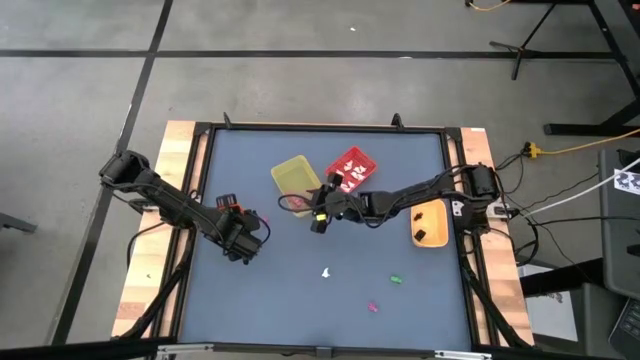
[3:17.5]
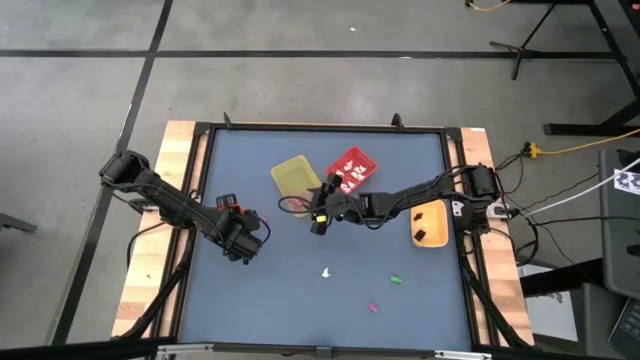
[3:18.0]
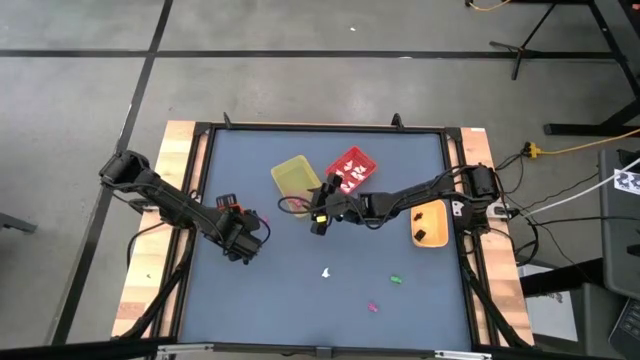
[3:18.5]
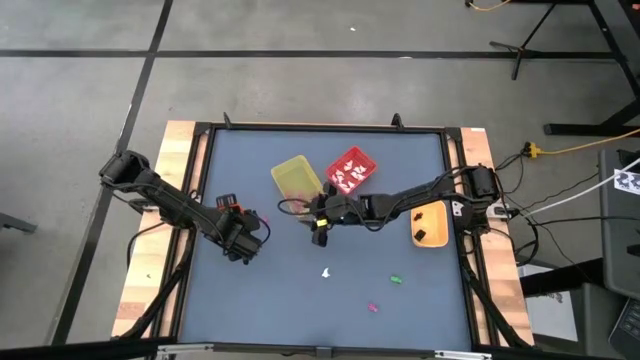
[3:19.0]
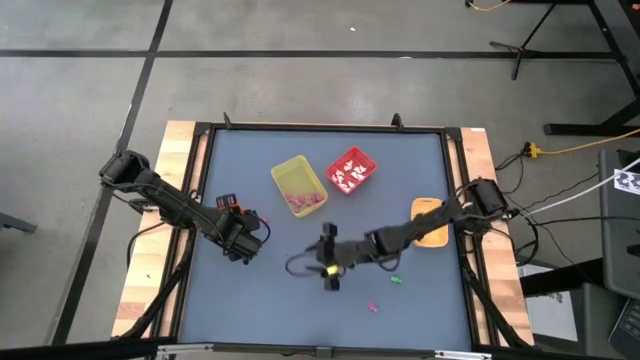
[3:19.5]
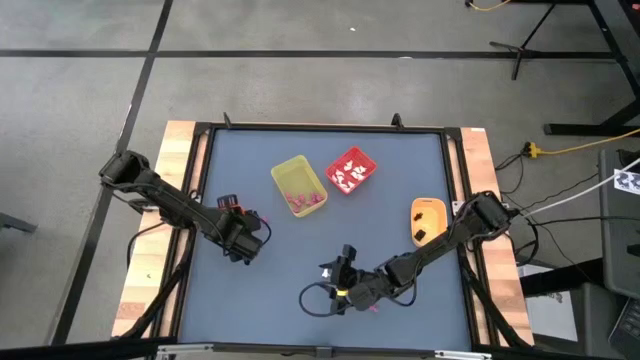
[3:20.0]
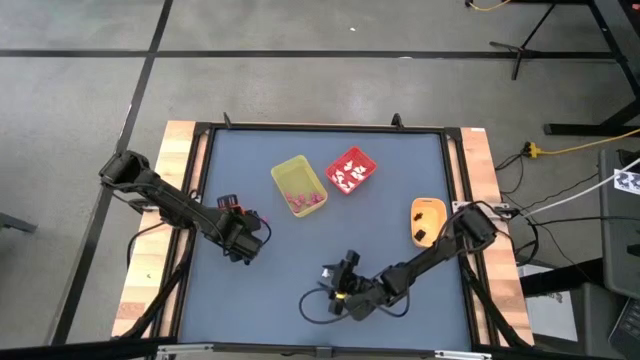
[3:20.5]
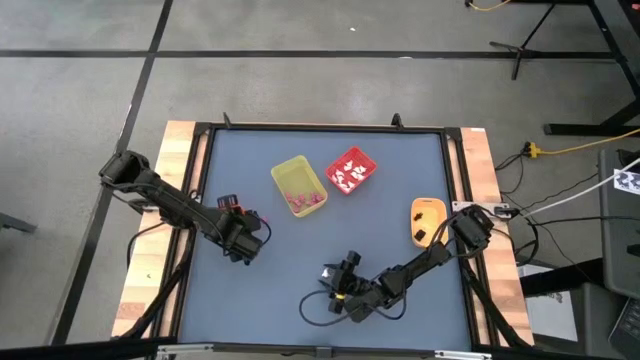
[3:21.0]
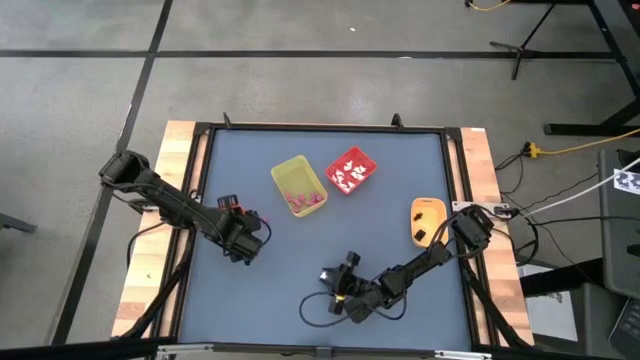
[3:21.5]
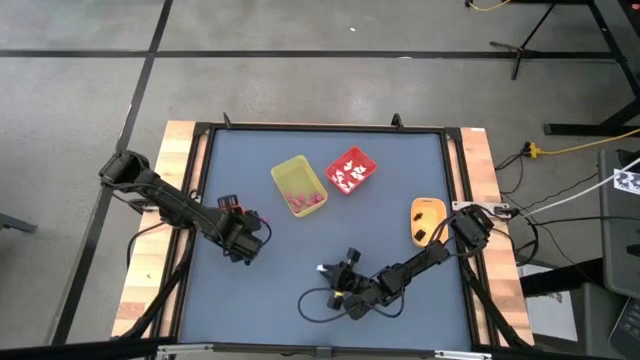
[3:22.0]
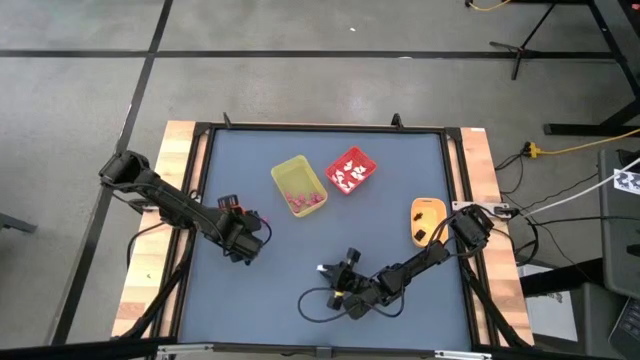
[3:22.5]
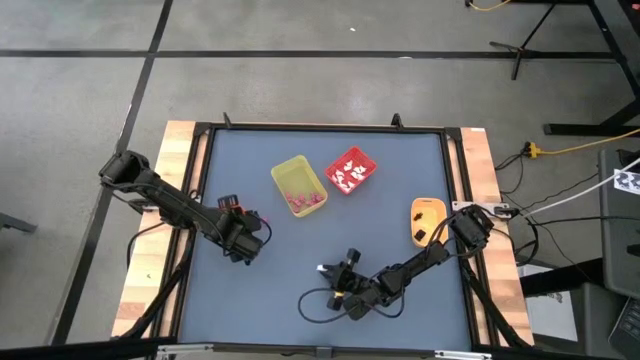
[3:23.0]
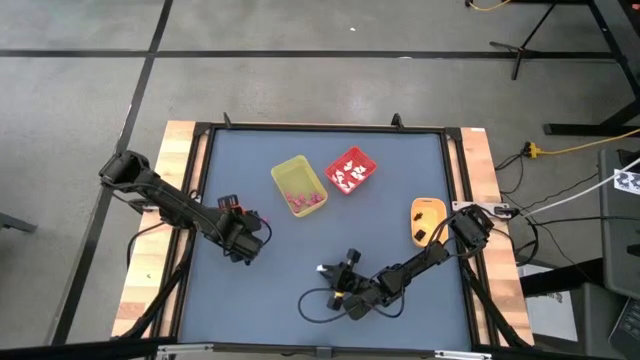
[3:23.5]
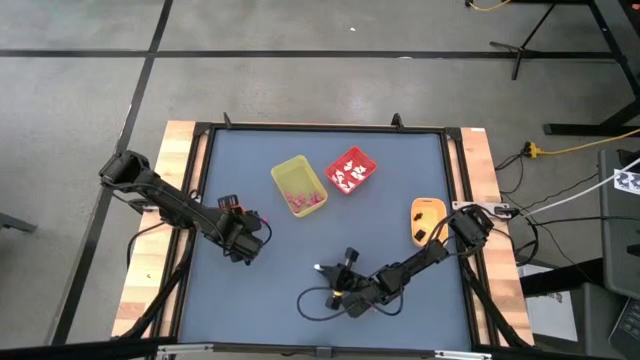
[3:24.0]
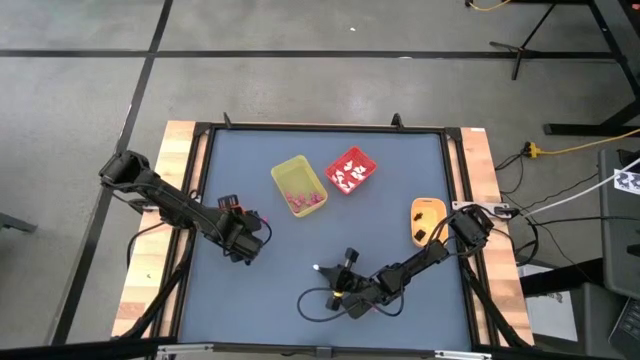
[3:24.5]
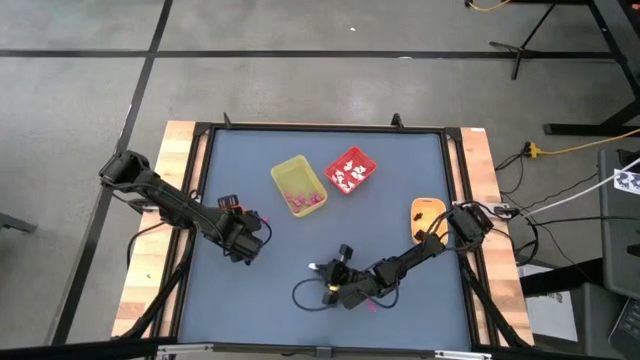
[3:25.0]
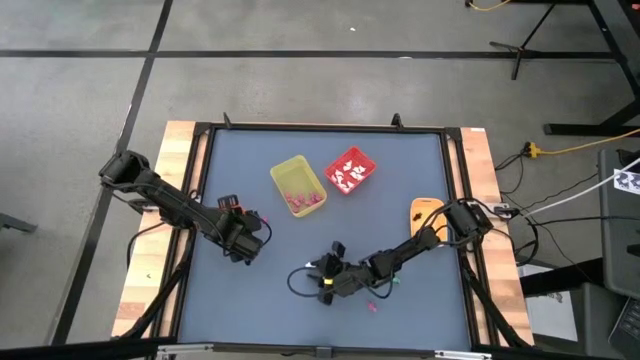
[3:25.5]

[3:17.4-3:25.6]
Task: Sort Halloween decoration
Put the white ghost toy into the red bin

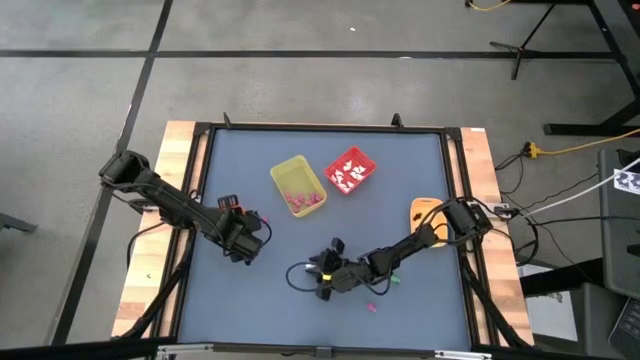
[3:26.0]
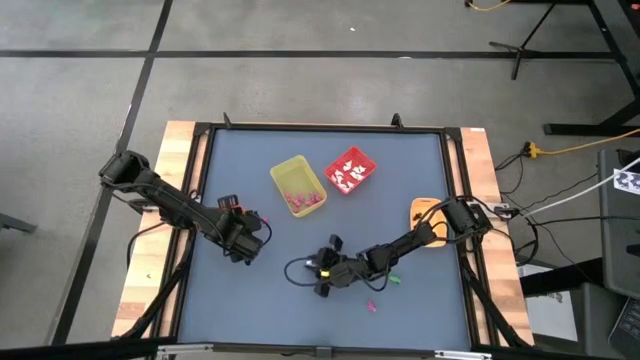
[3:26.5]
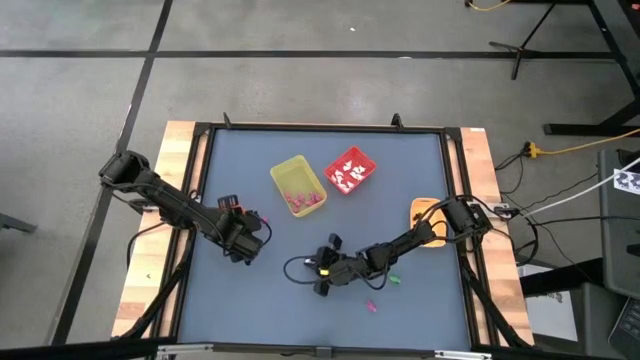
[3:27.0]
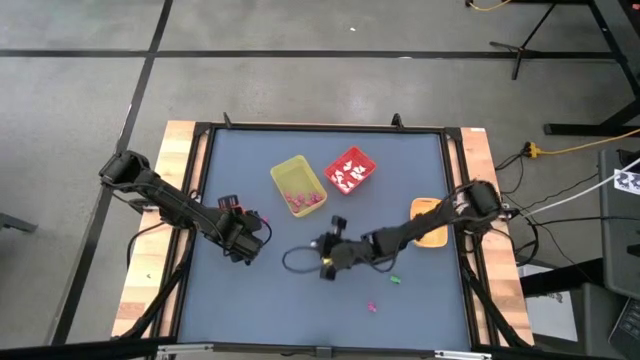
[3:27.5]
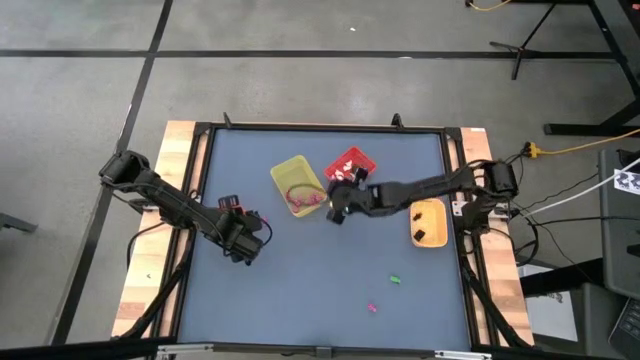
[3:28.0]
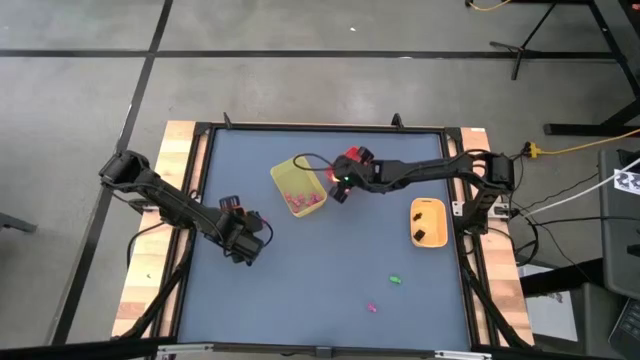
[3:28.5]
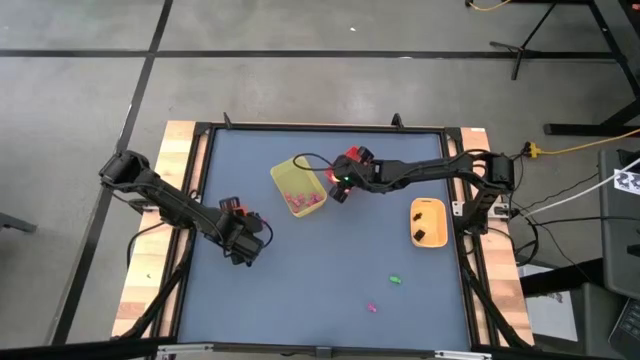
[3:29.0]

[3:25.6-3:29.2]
Put the white ghost toy into the red bin

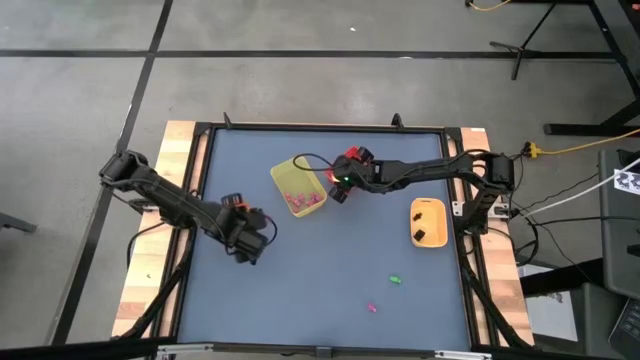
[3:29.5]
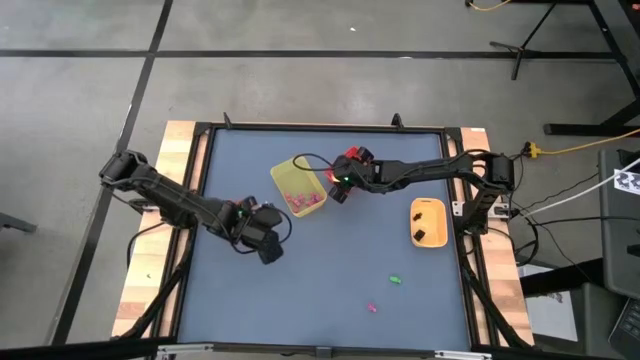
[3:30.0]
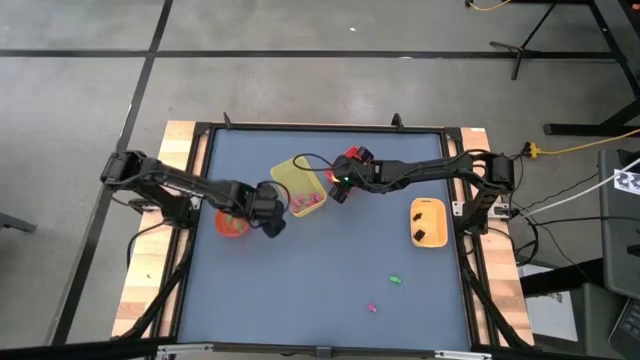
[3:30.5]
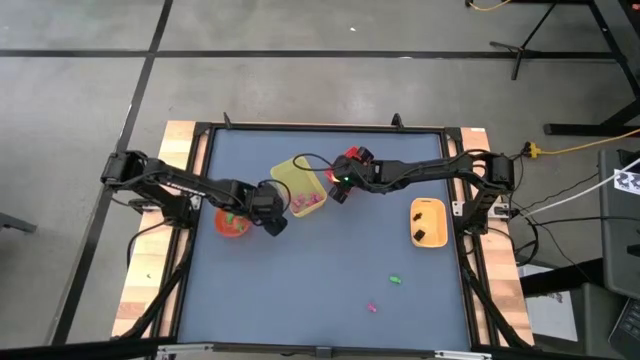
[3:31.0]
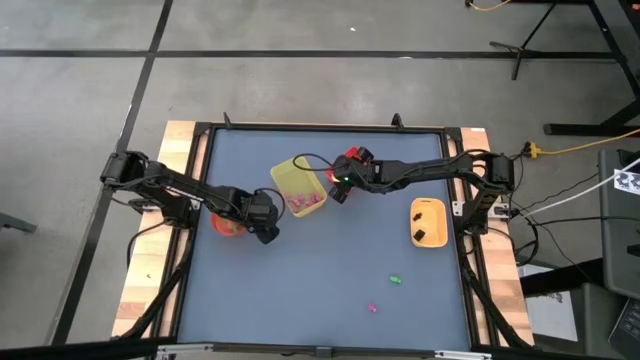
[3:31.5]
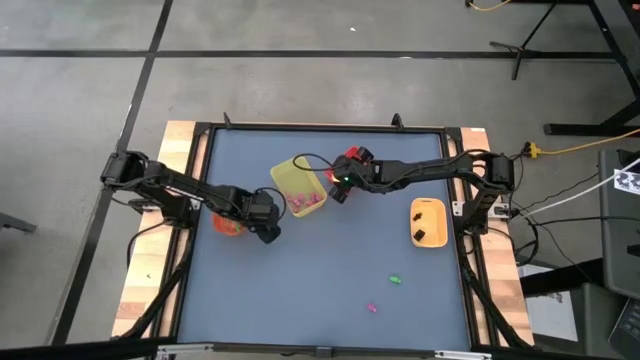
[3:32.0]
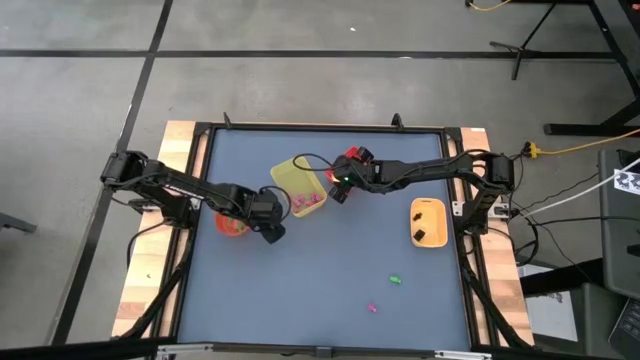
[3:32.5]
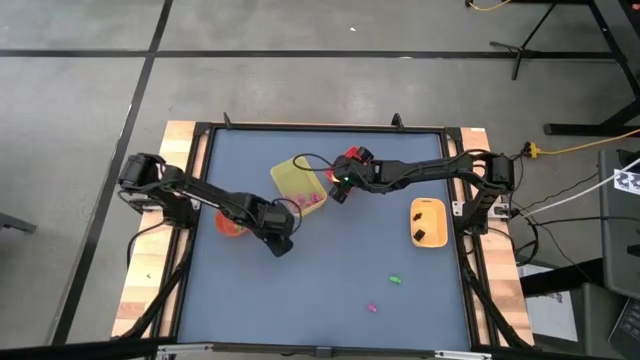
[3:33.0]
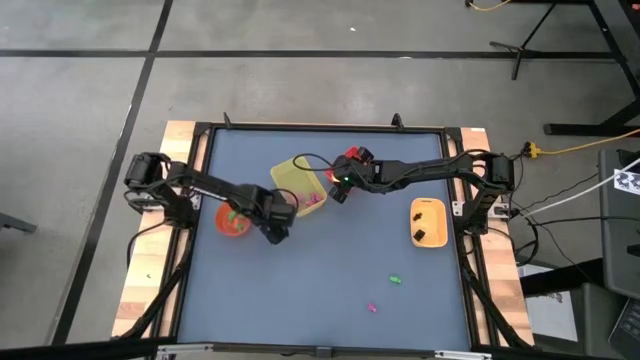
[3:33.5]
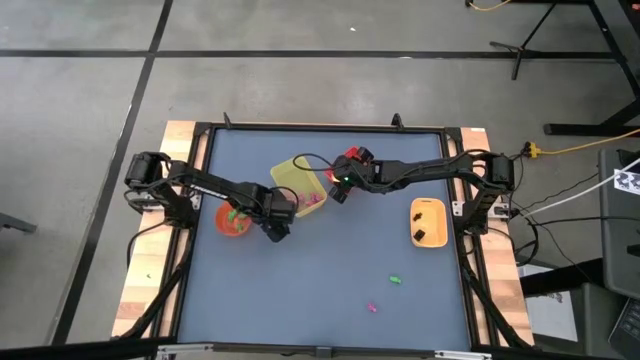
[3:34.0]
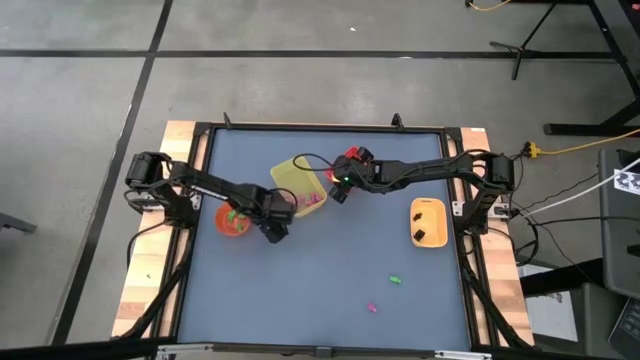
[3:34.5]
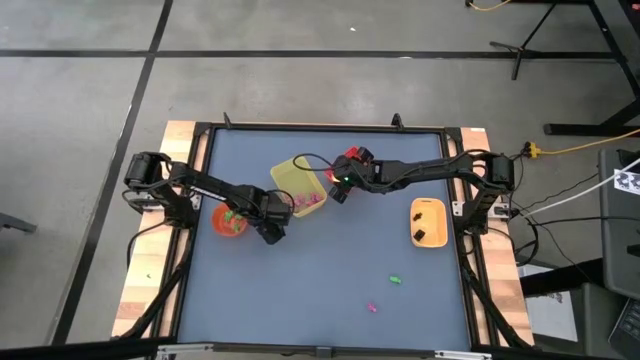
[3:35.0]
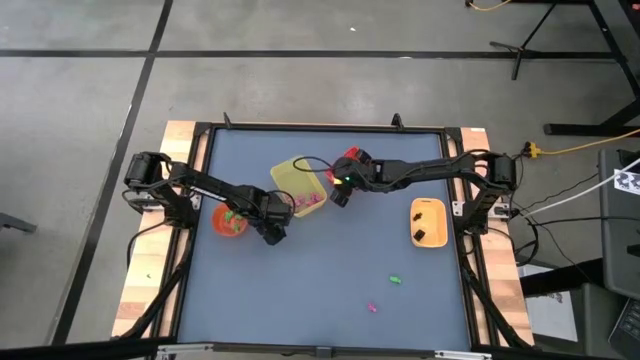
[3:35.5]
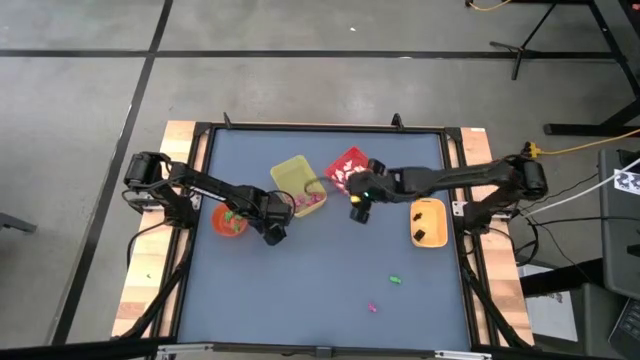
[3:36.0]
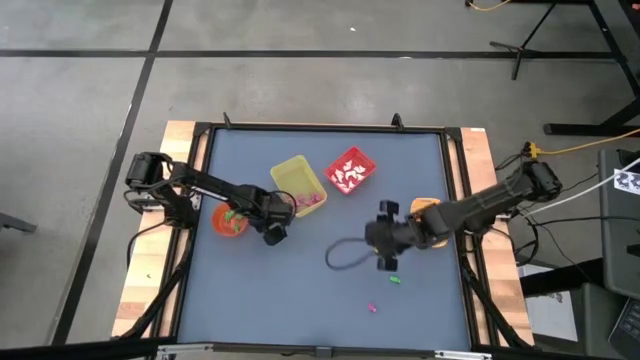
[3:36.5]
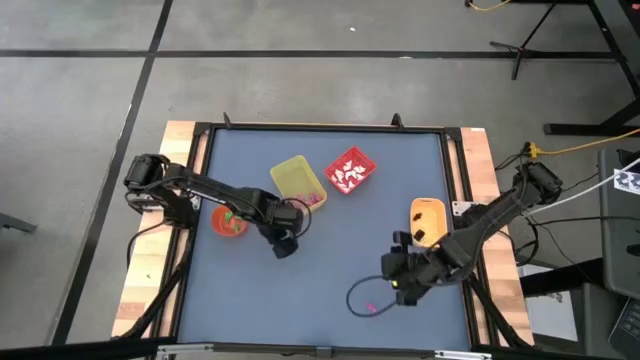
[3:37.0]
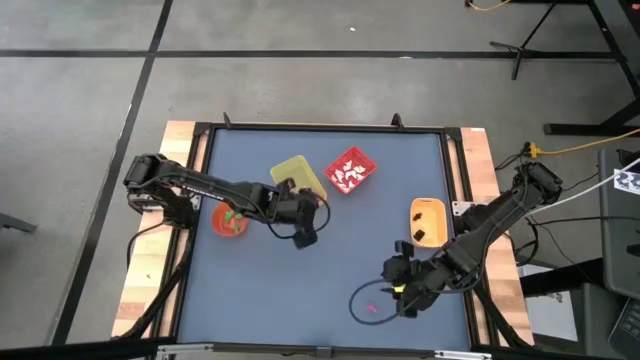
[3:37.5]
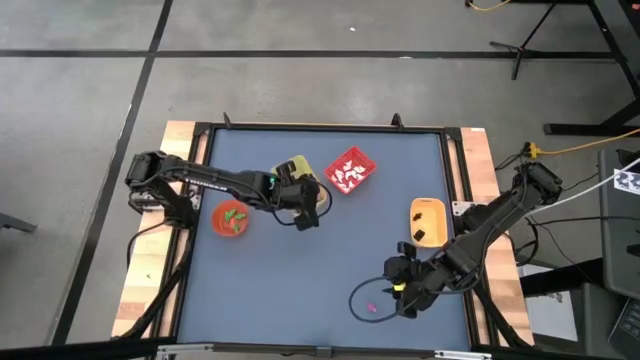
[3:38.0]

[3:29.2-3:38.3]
Put the pink skeleton toy into the yellow bin

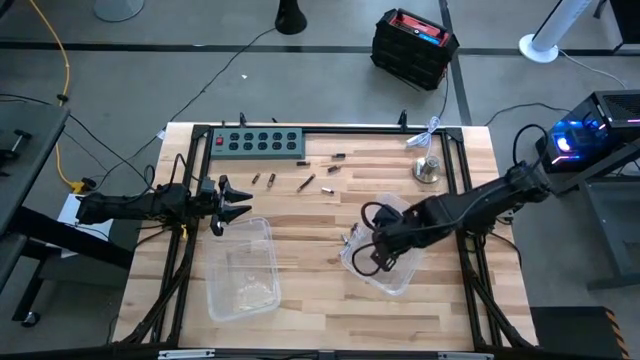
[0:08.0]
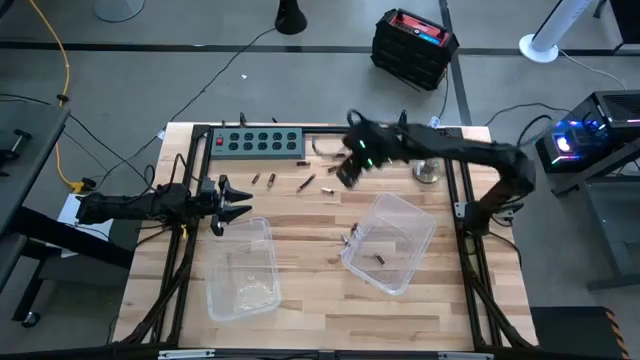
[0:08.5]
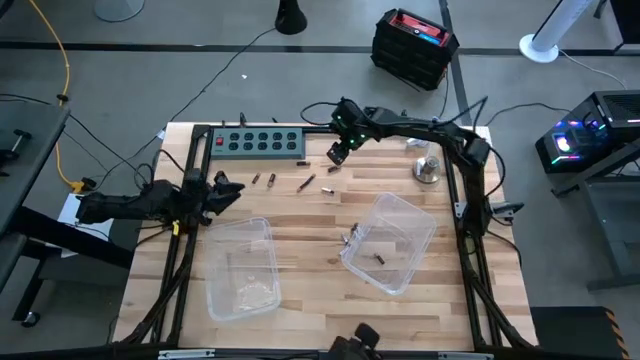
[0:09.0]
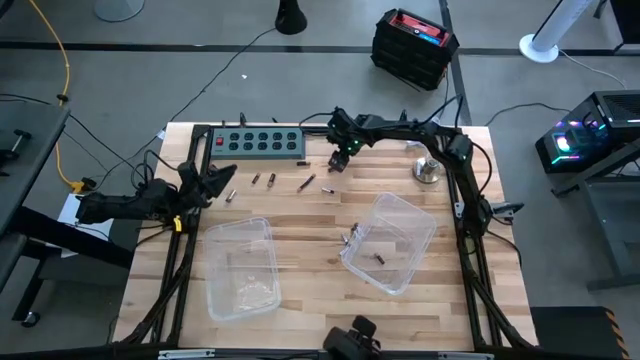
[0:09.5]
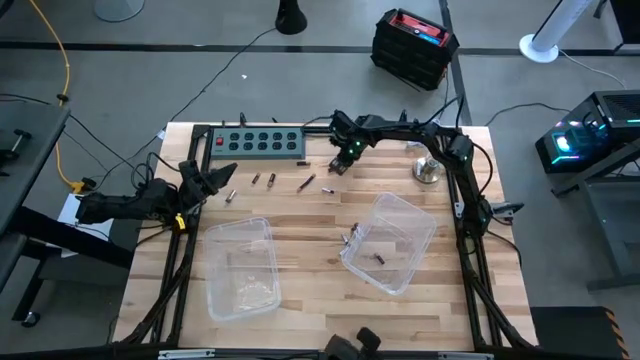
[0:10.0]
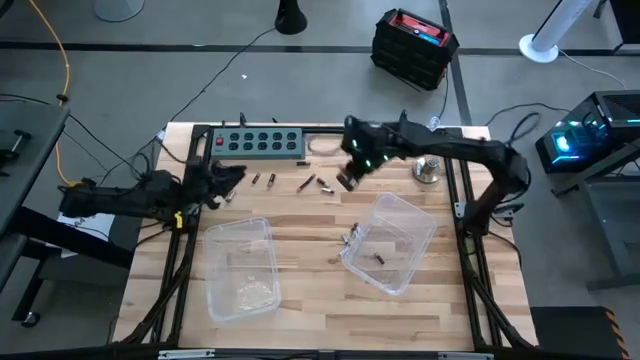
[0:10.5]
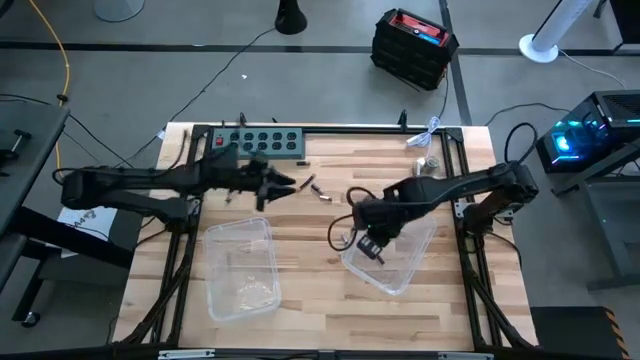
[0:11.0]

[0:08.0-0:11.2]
Task: Sort batteries
Put the black battery into the right transparent bin
